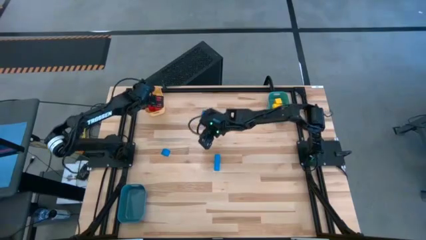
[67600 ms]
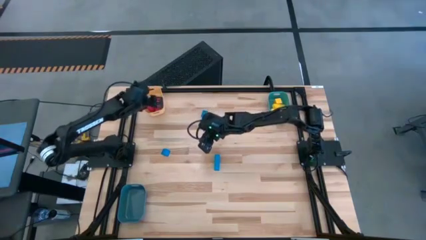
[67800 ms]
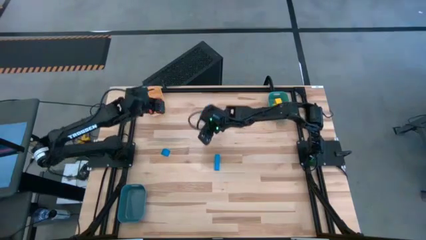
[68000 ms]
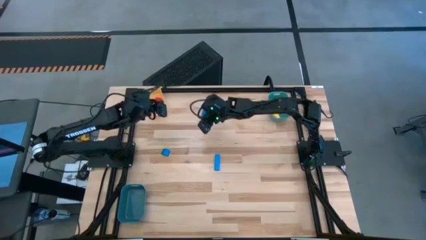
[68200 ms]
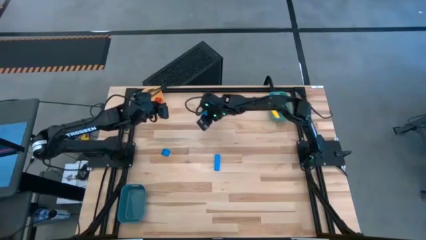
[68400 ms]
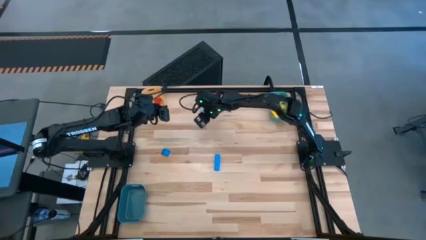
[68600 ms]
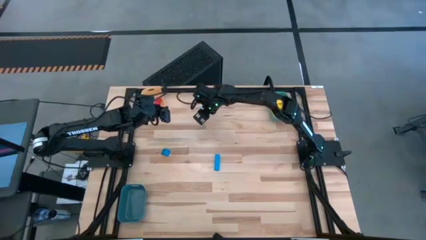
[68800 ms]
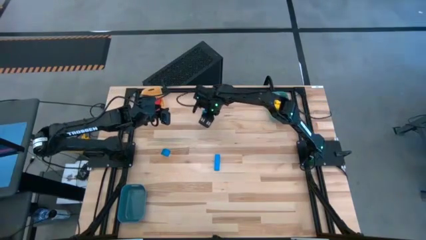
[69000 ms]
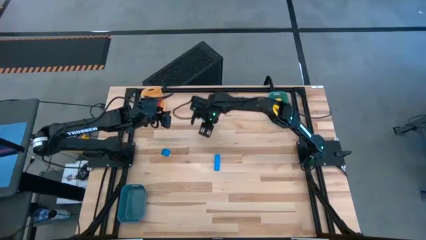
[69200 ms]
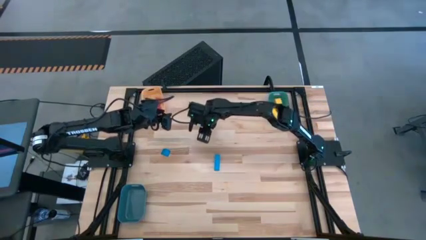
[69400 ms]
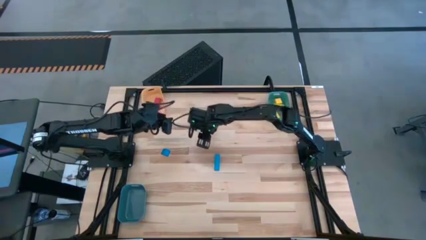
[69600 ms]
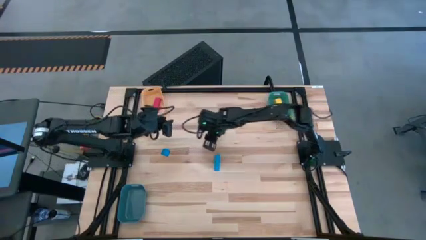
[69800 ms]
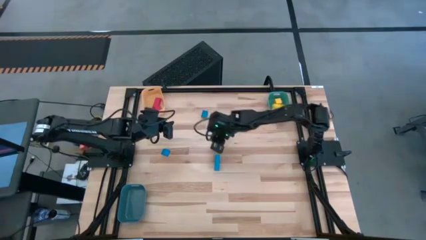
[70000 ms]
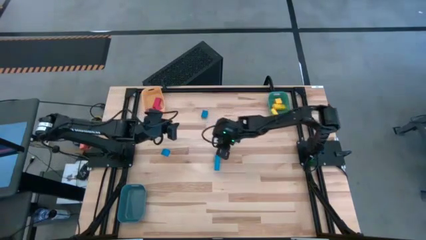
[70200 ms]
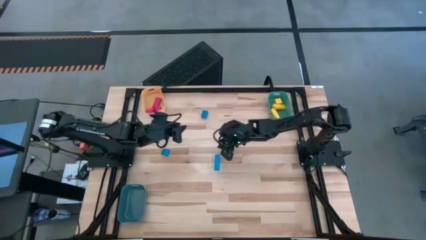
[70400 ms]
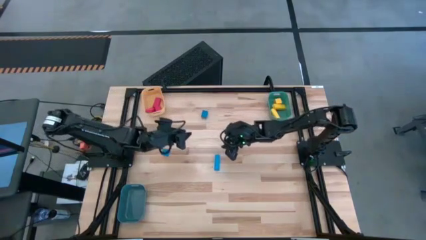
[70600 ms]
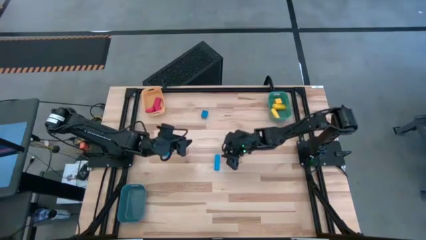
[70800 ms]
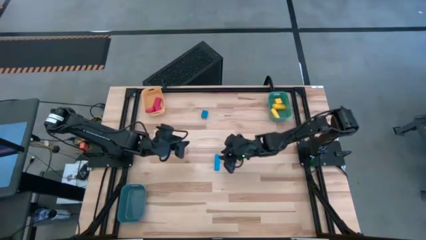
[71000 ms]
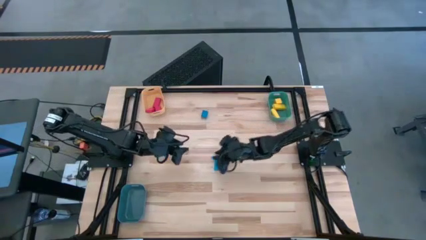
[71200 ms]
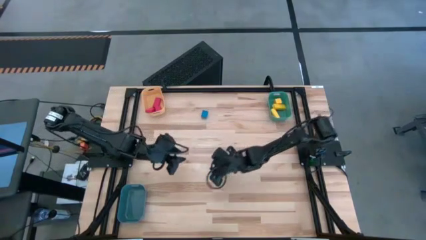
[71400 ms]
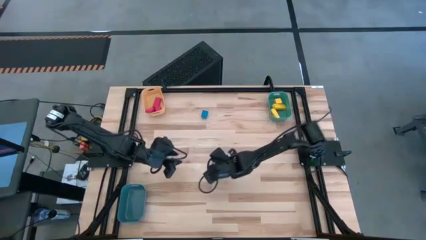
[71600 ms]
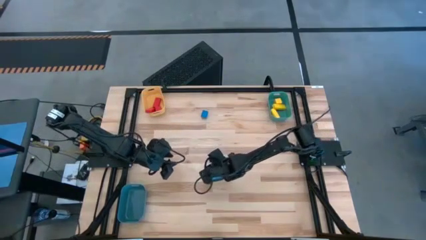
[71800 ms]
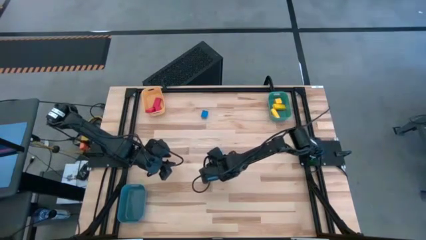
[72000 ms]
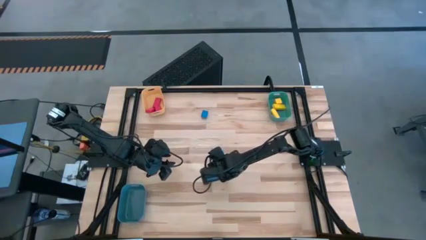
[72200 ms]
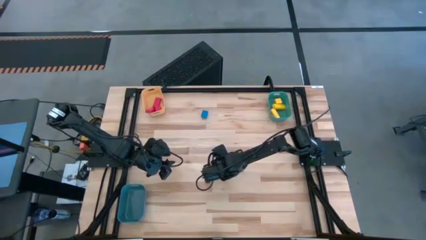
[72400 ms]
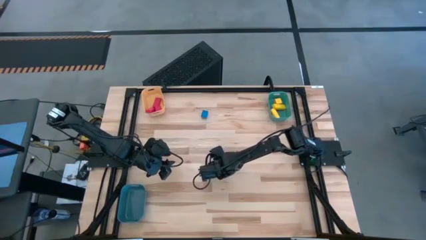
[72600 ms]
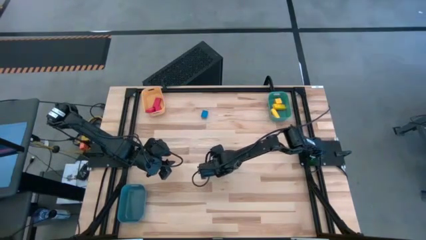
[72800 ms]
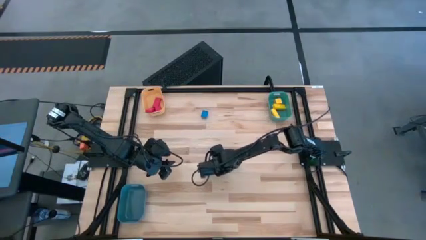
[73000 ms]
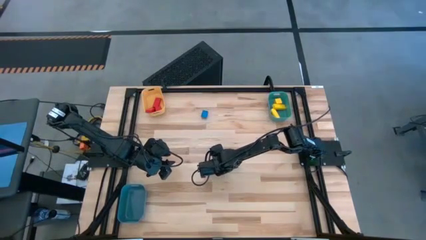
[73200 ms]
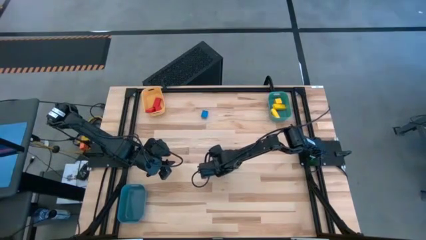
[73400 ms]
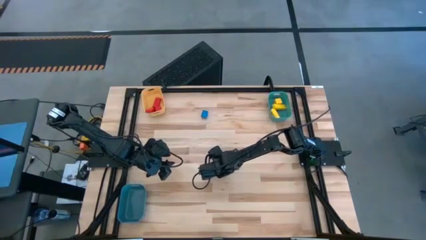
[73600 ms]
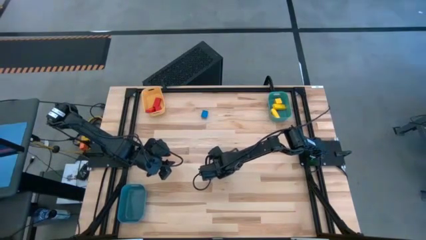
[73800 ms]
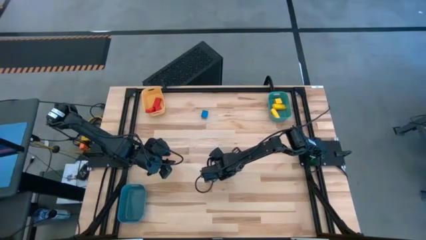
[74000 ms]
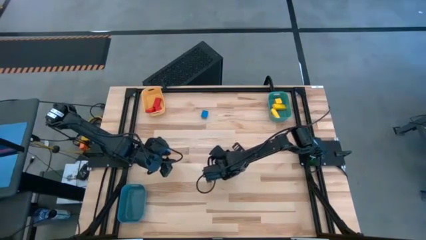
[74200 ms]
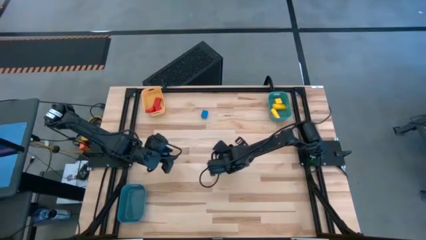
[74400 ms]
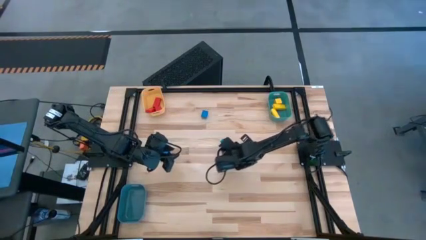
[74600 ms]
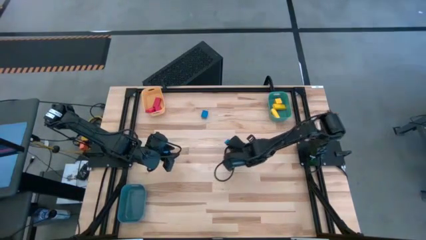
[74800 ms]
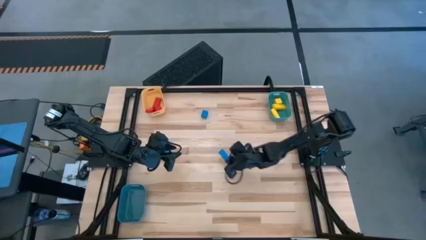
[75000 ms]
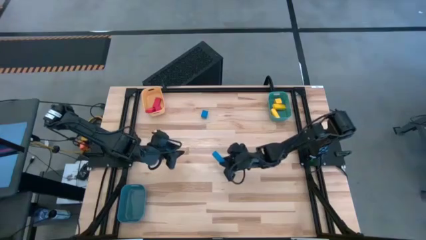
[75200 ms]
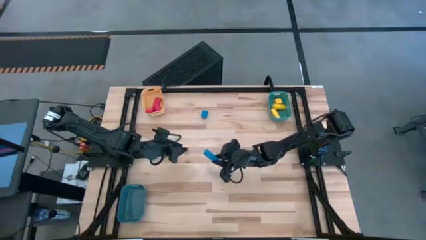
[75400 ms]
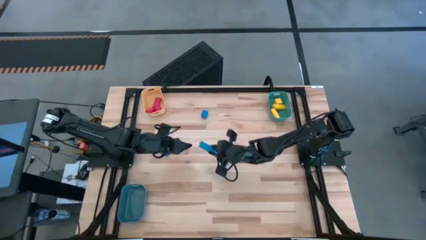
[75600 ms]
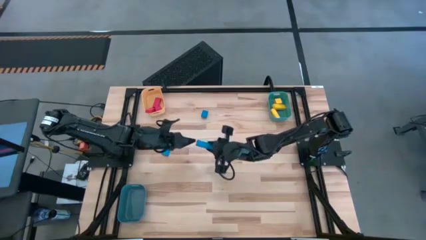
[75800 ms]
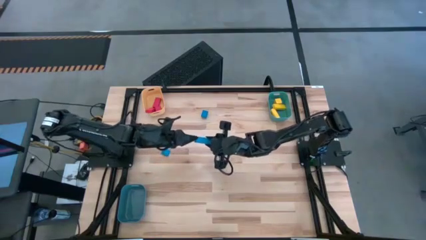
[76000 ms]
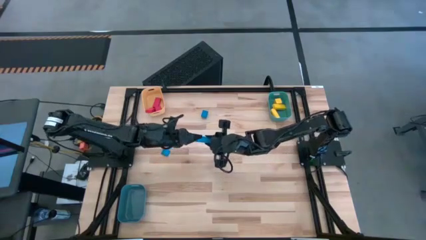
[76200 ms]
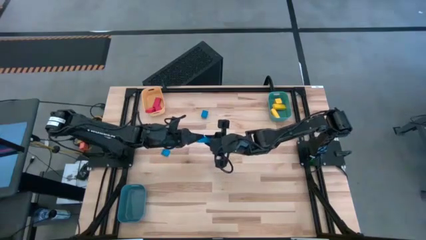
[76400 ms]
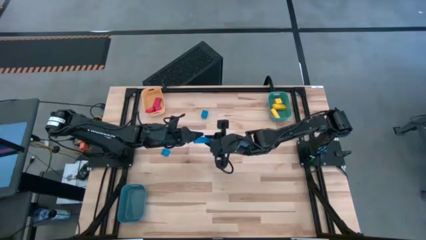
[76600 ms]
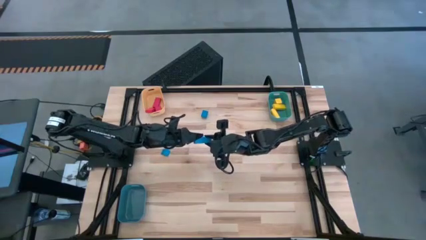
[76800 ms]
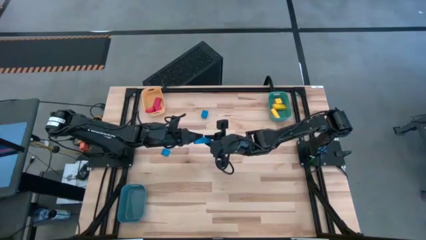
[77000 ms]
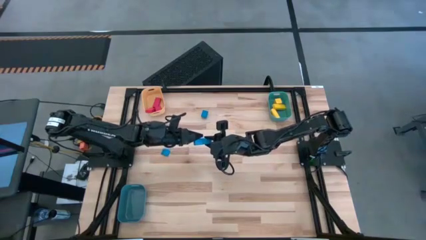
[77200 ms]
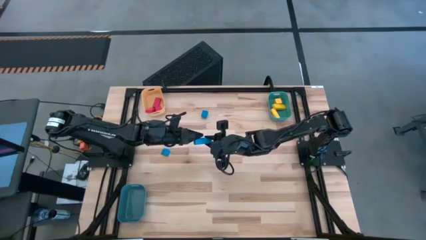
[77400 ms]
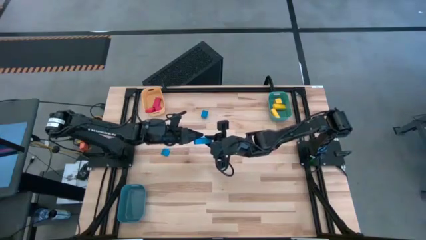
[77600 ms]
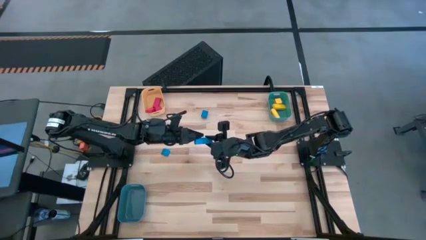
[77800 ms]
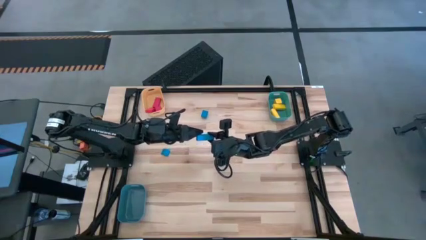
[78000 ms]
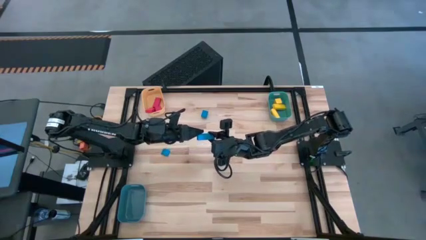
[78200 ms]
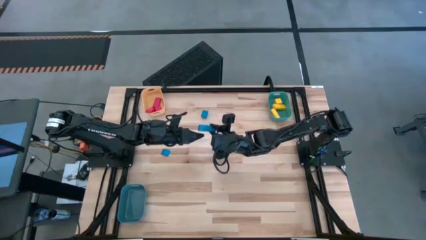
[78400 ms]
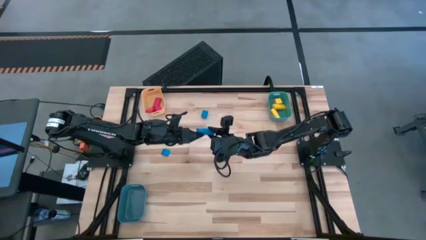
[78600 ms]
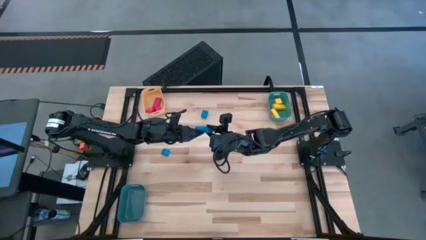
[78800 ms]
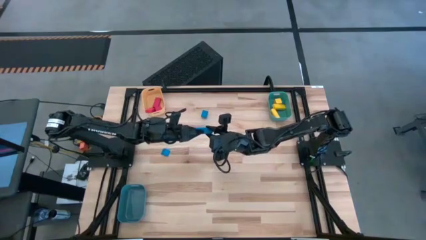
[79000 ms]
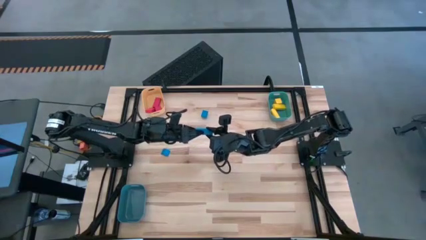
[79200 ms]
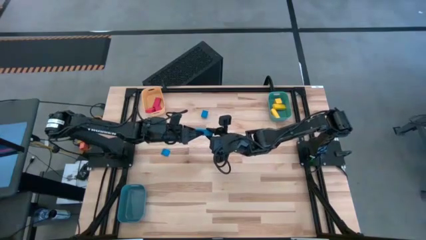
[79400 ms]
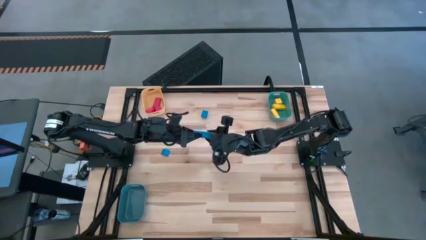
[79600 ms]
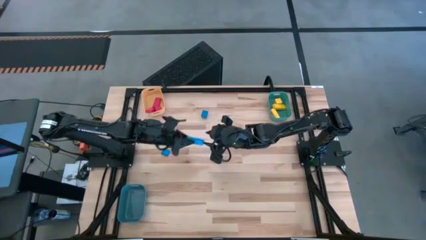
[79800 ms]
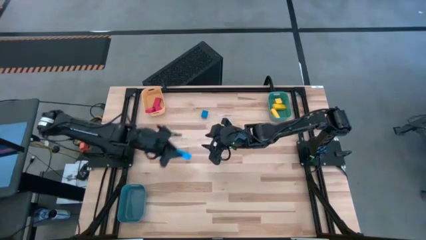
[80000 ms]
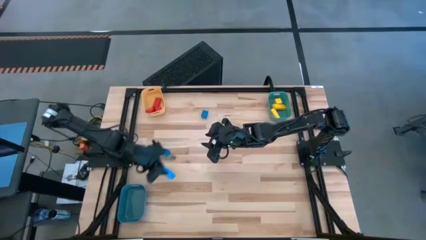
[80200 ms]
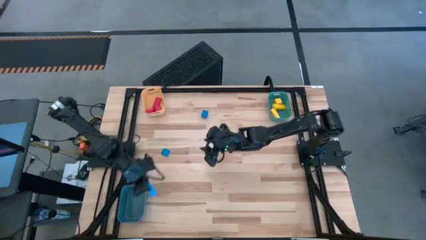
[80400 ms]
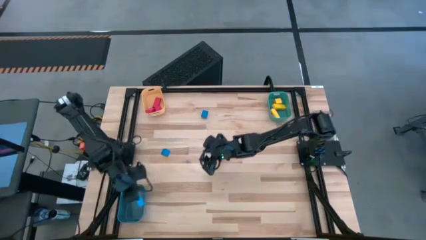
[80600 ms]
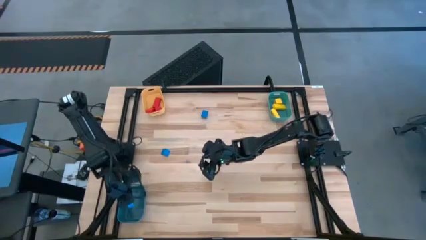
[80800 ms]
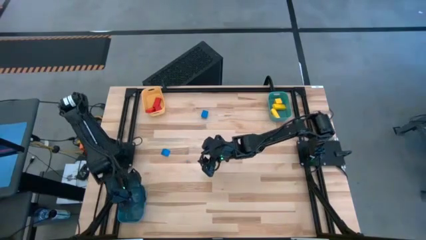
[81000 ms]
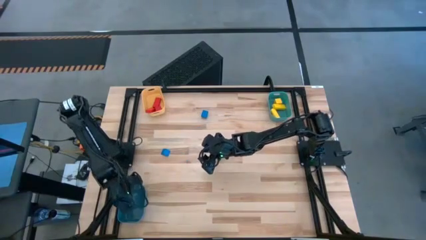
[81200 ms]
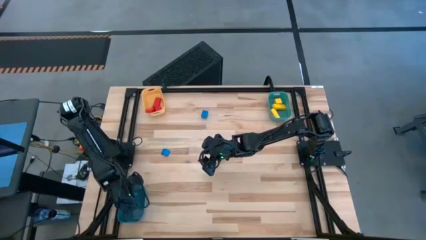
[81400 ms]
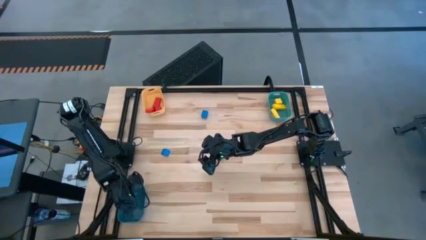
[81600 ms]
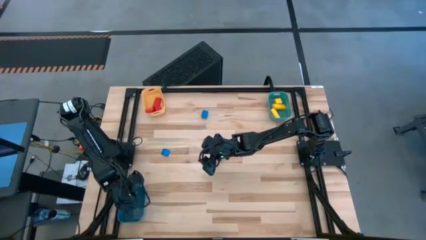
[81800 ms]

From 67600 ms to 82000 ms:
Task: Sort & place blocks by color
Put the bottom right blue block into the blue bin
